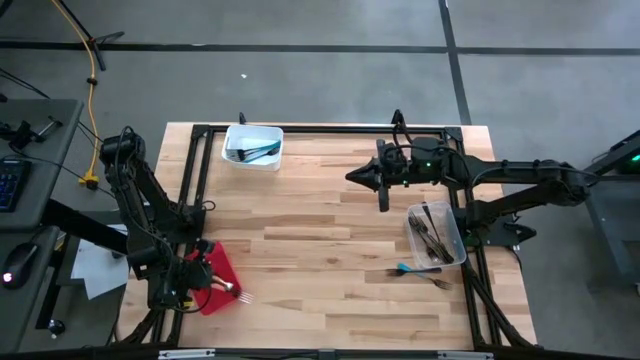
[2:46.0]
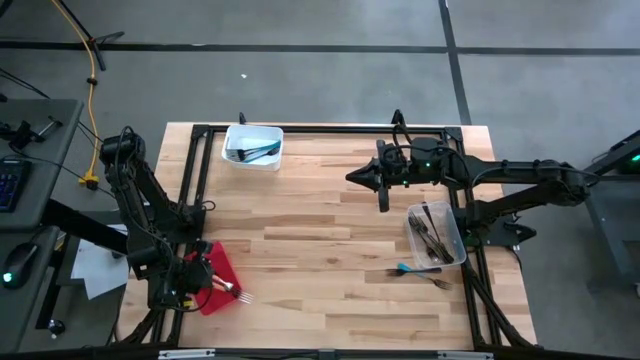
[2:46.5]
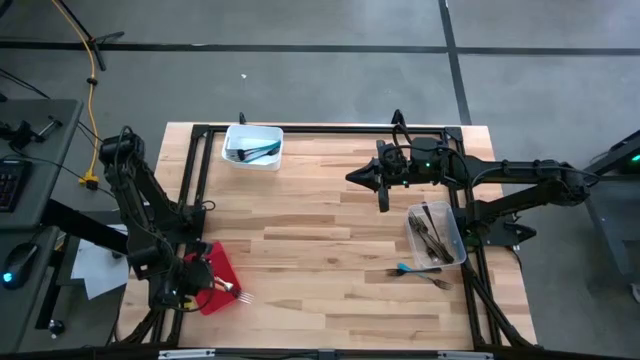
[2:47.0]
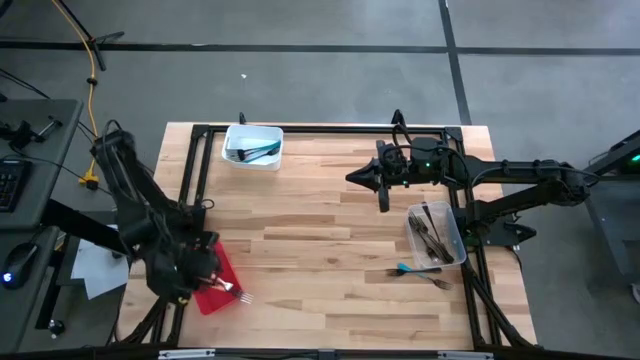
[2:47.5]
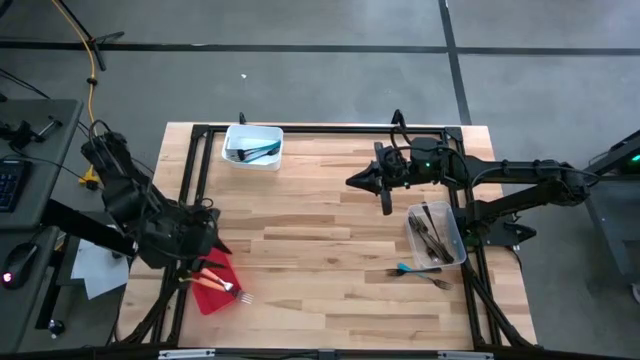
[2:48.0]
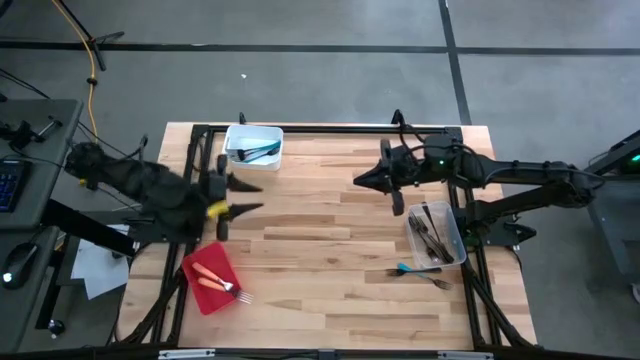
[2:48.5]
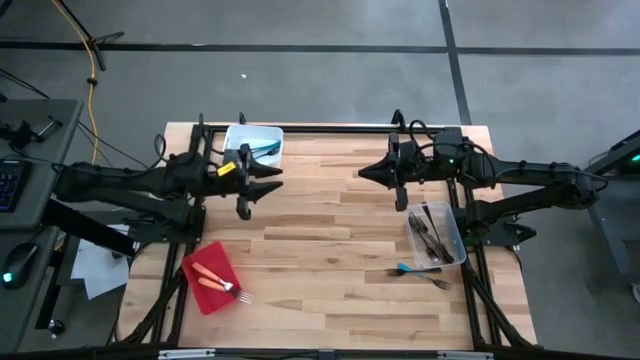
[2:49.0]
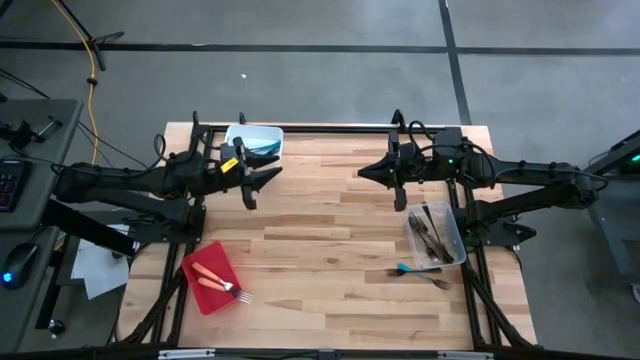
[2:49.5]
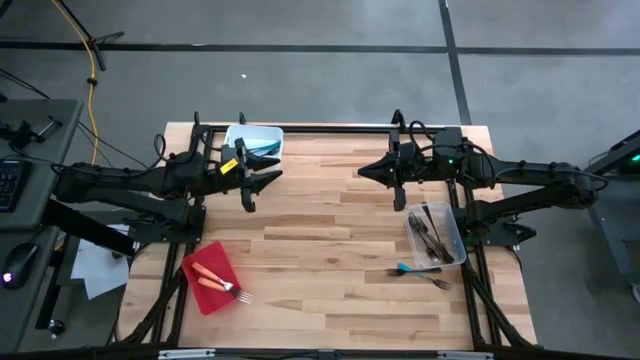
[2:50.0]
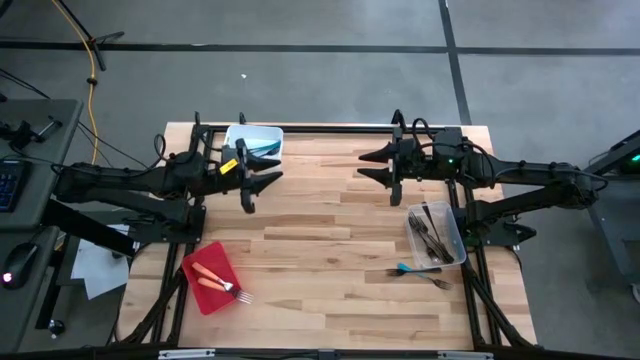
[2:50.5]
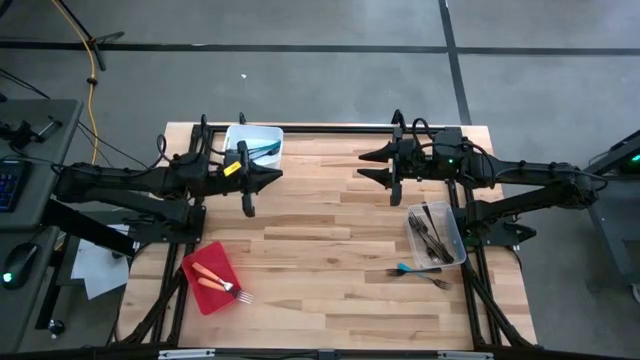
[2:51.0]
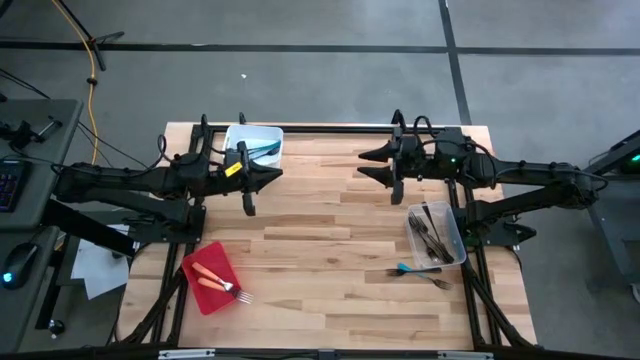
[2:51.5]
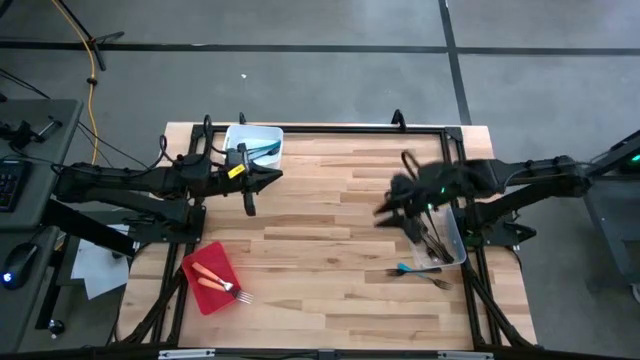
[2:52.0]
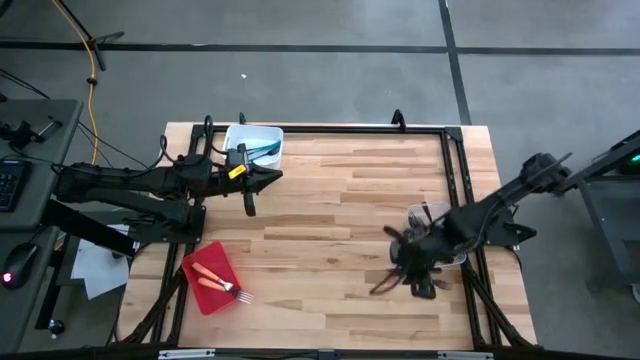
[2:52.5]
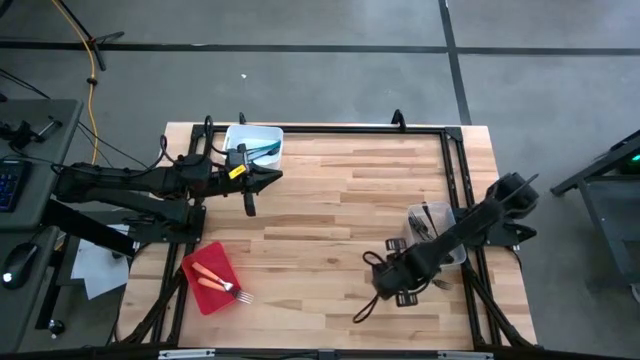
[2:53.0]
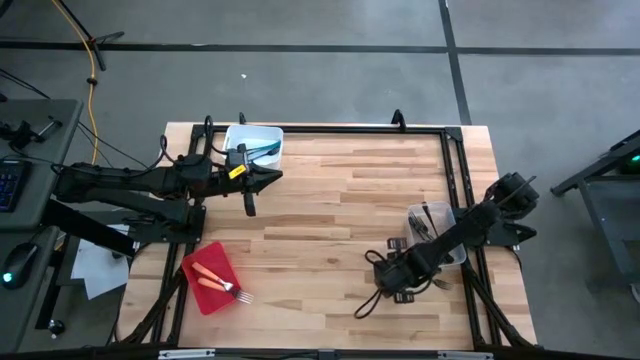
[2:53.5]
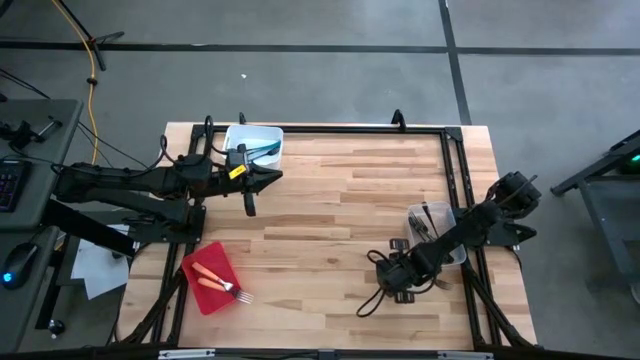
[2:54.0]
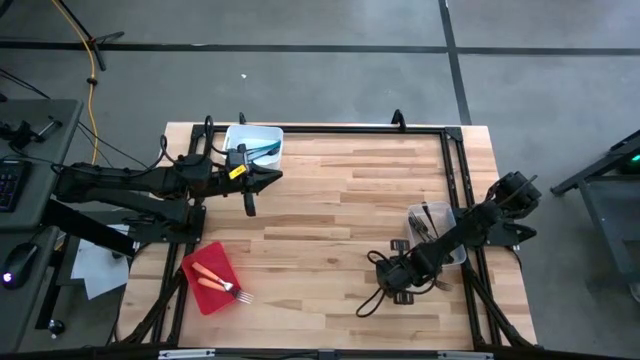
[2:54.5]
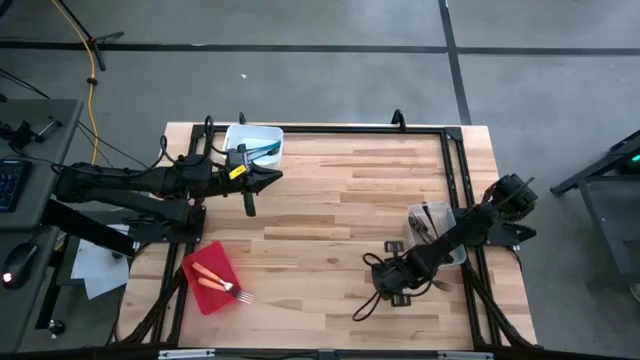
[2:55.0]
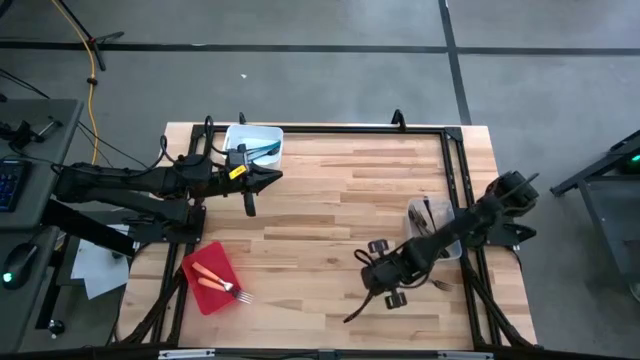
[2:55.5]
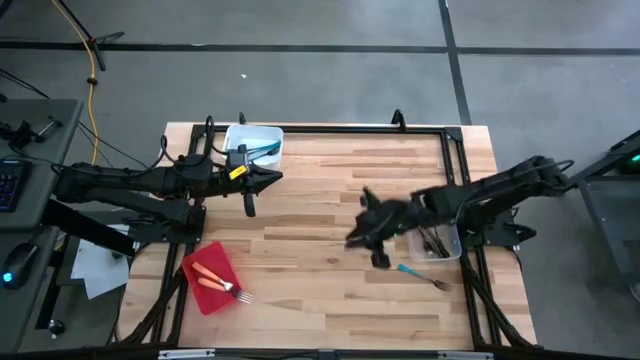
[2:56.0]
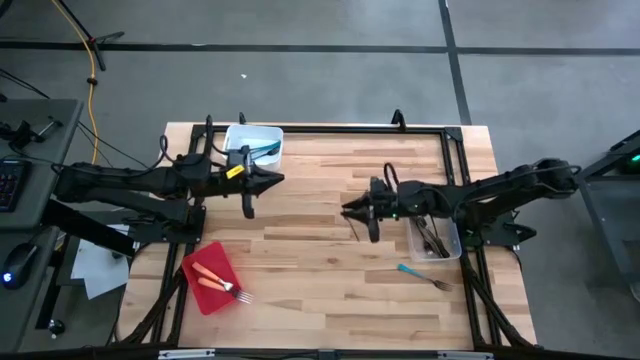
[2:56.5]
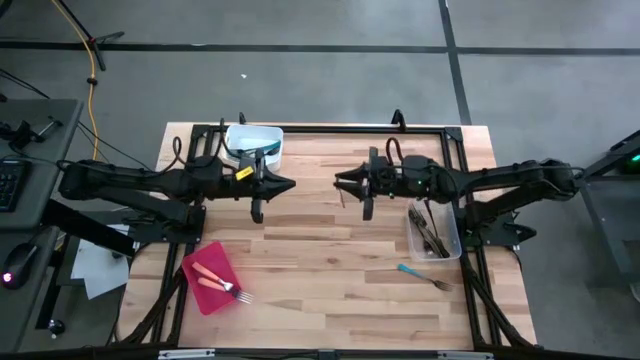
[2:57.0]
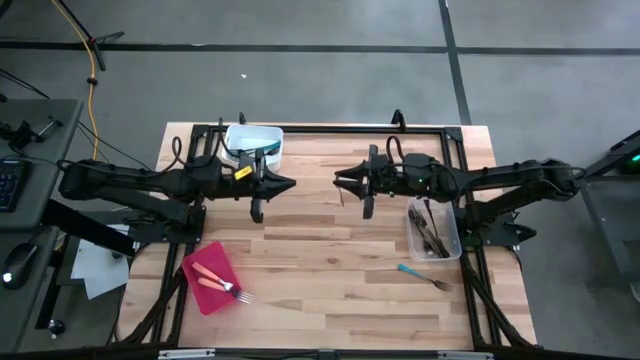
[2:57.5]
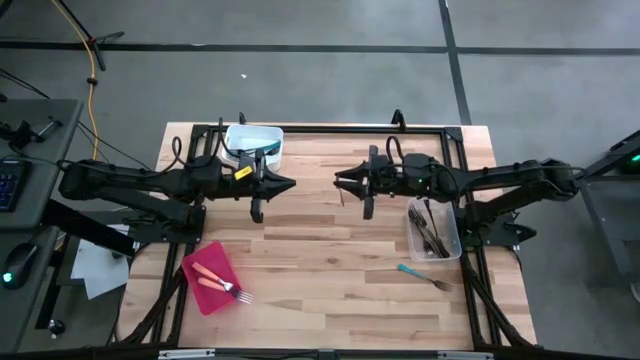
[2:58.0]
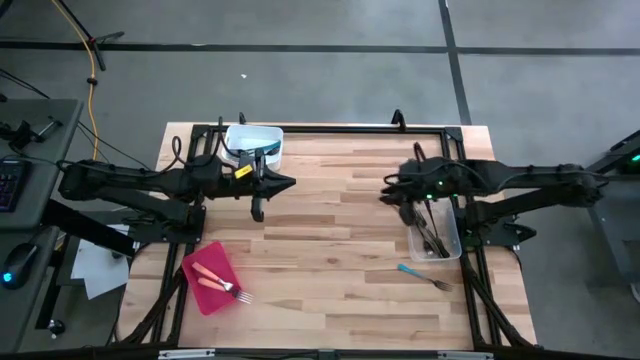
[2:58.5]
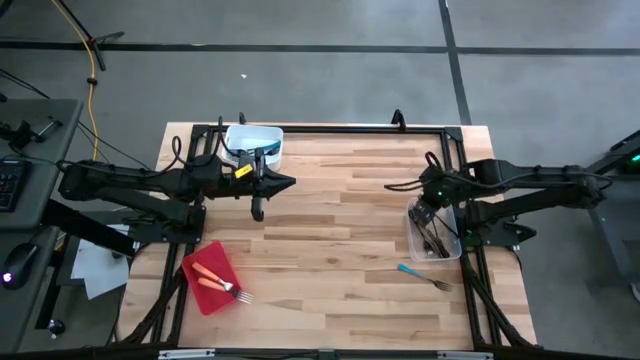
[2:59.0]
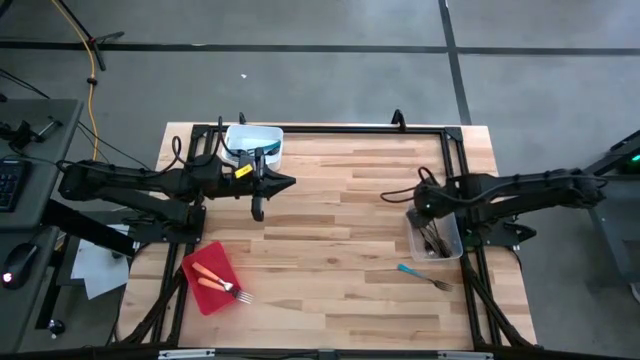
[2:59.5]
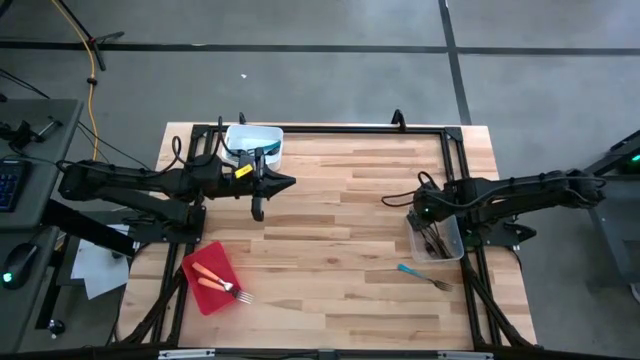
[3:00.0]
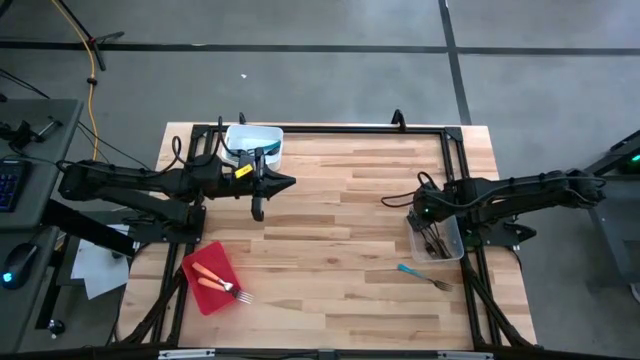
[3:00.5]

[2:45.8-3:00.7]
Task: Sort silverware by color (type)
Put the black fork into the transparent bin

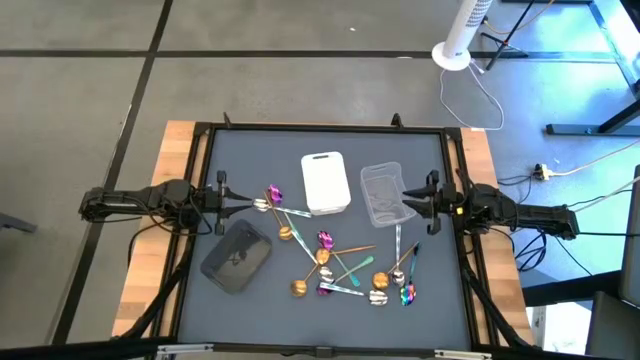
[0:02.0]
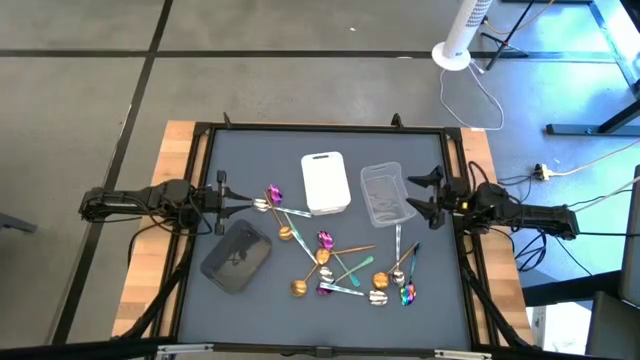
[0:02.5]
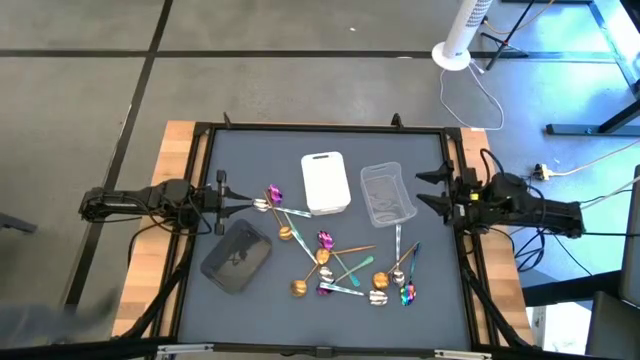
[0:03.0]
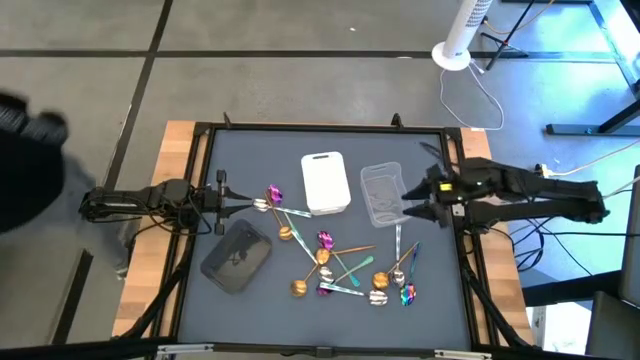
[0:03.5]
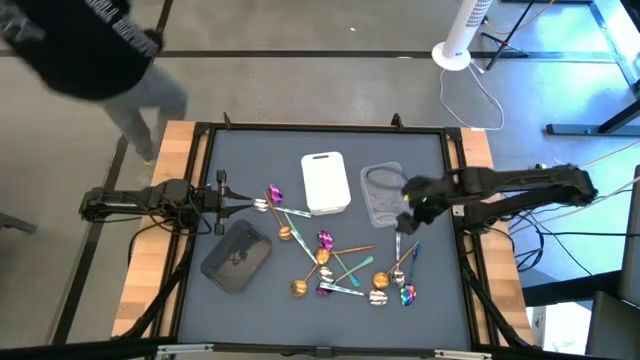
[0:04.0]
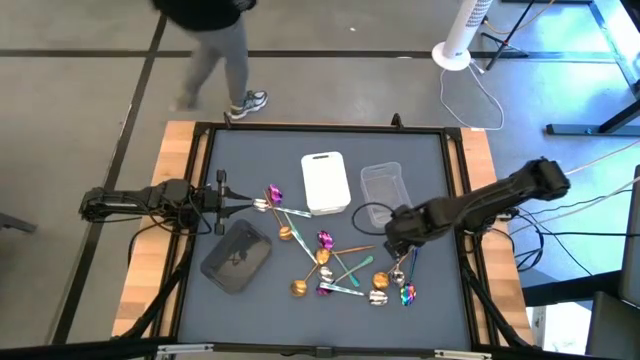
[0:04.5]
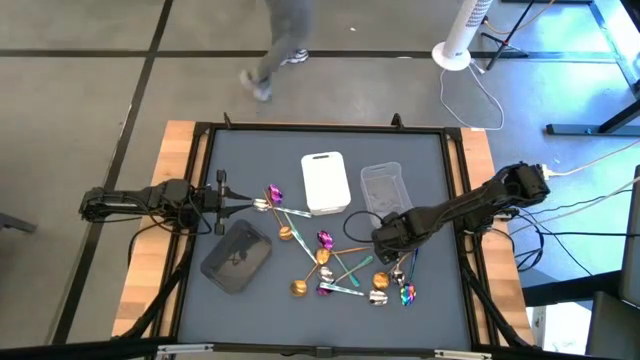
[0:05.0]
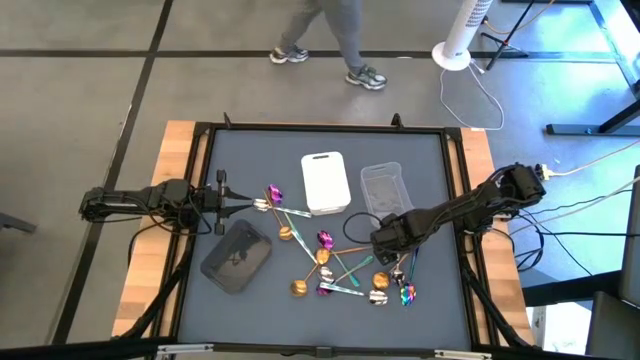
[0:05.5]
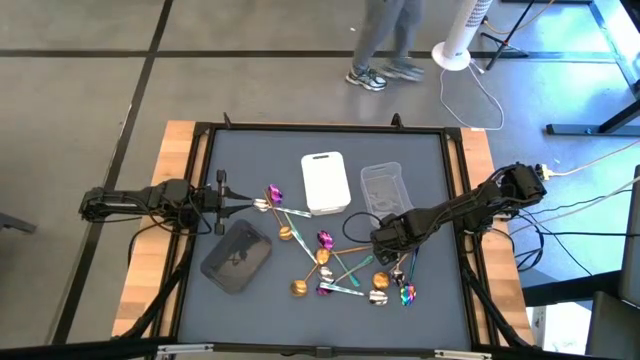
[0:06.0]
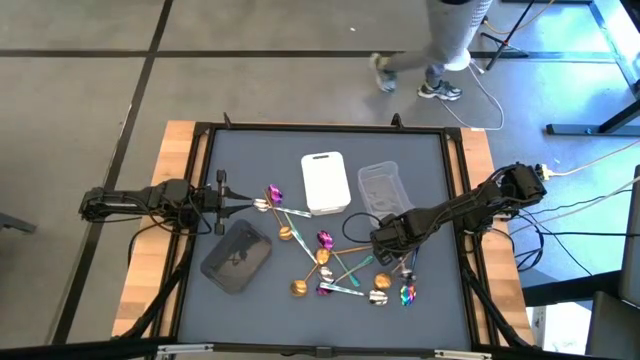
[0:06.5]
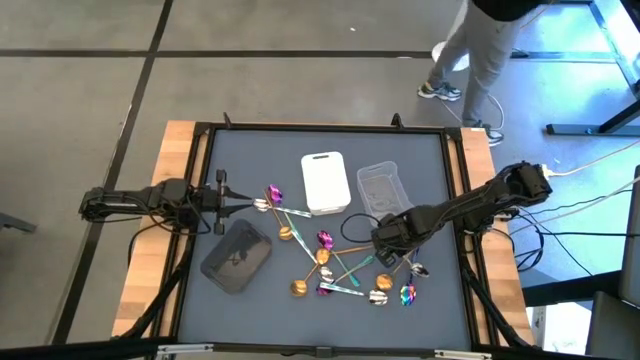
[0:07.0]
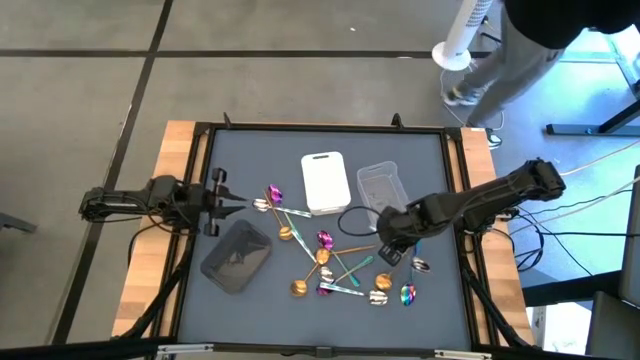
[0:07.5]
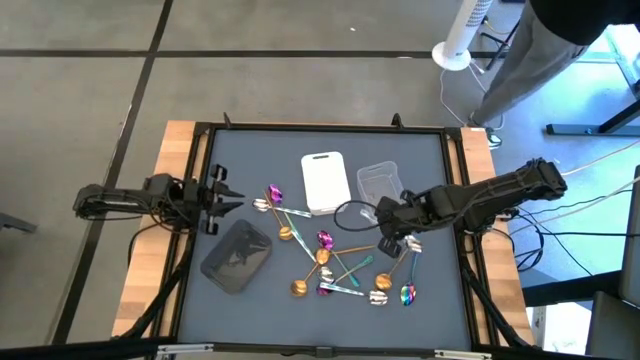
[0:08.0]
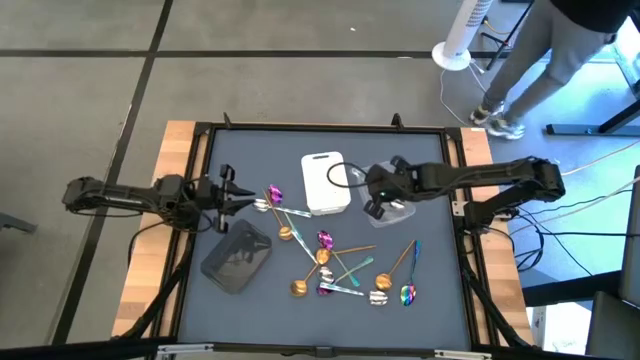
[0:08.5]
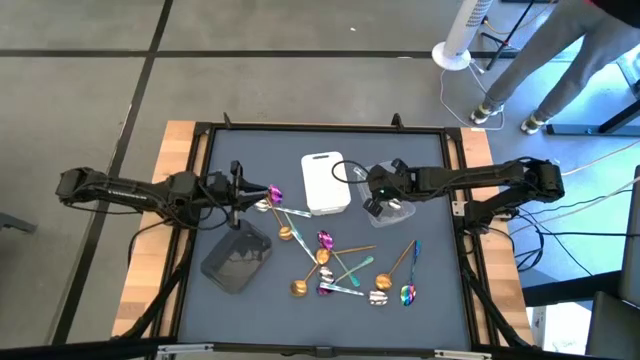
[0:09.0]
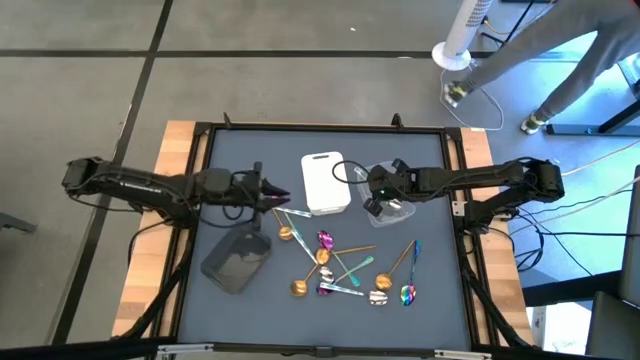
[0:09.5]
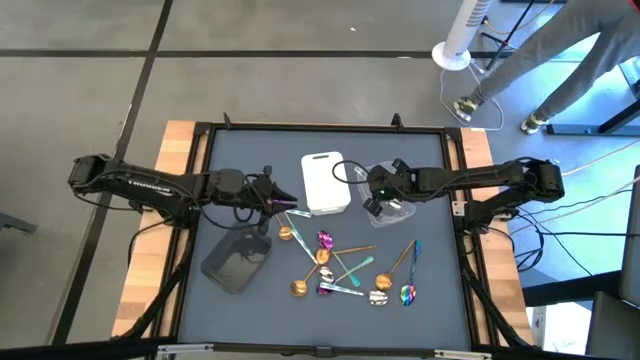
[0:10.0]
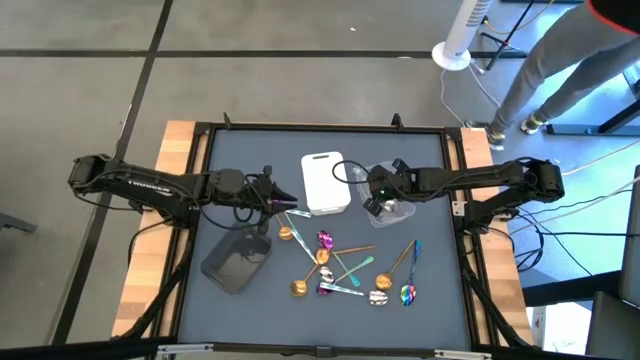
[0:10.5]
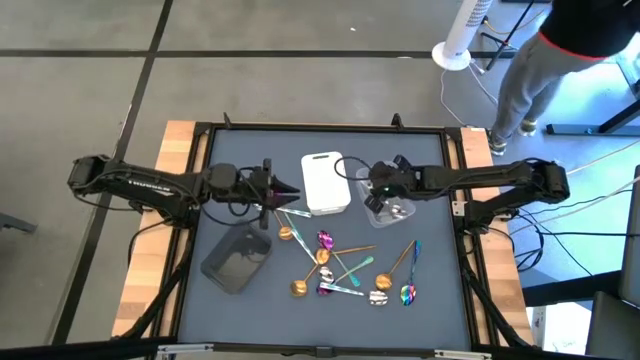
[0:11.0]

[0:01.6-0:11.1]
Task: Sort silverware by color (type)
Put the green spoon into the transparent bin
